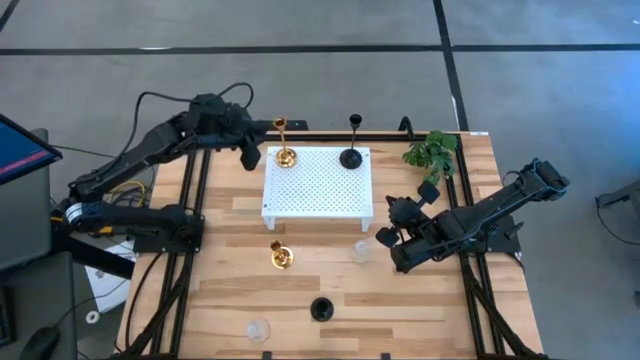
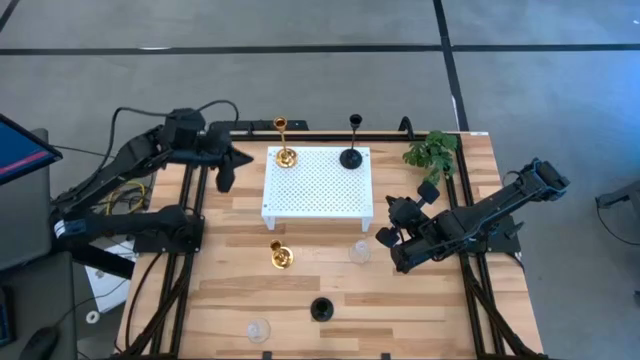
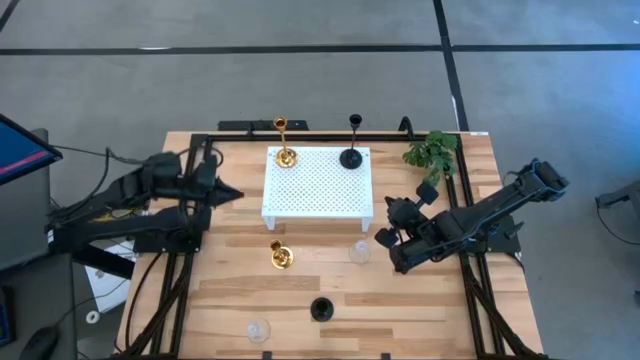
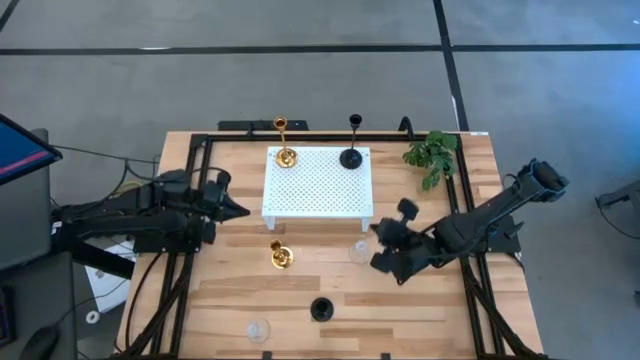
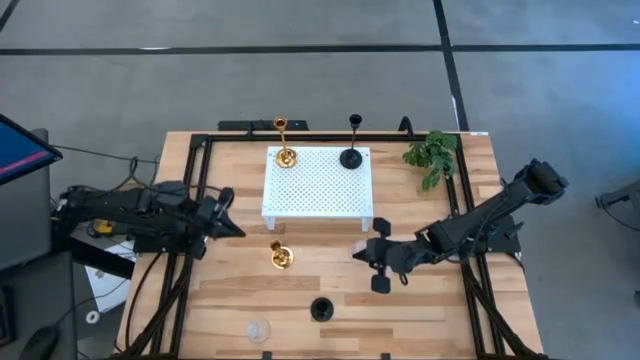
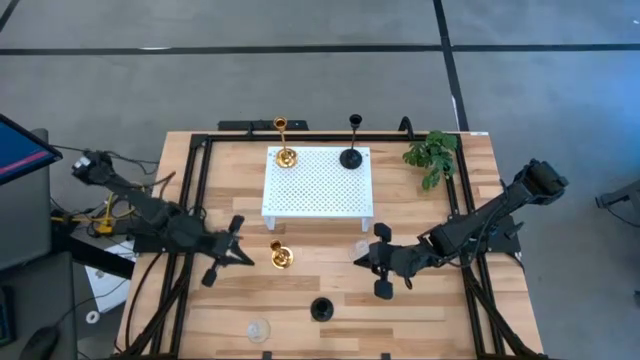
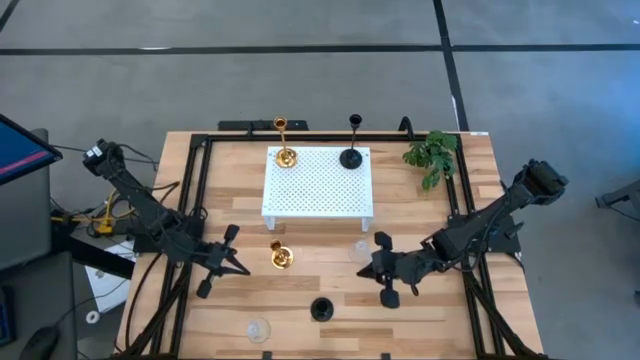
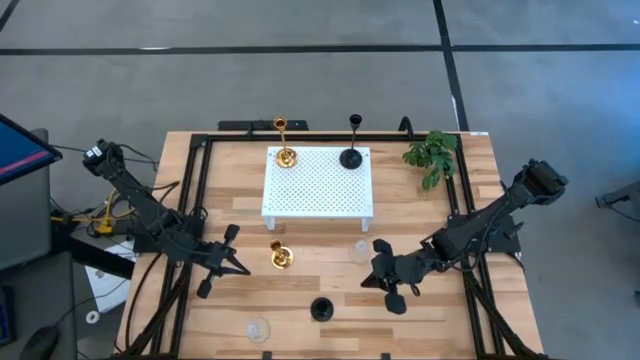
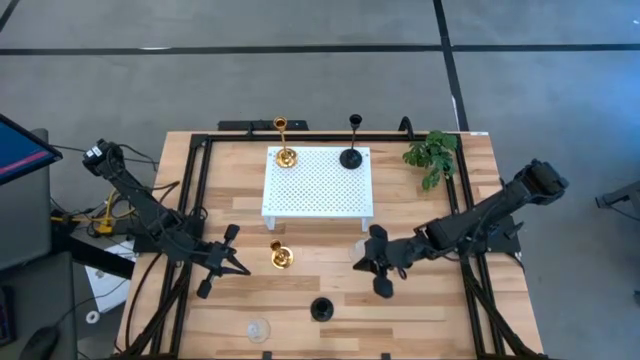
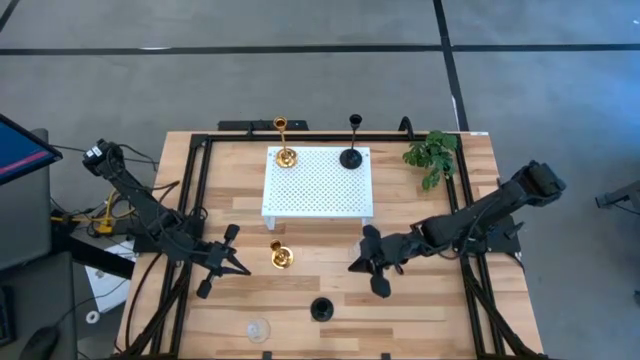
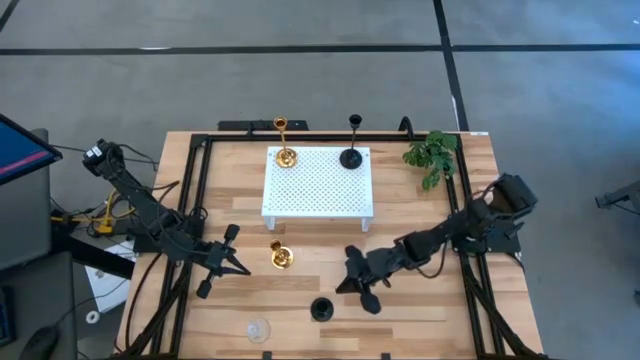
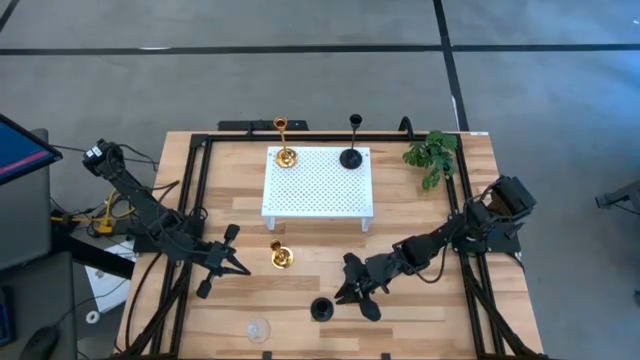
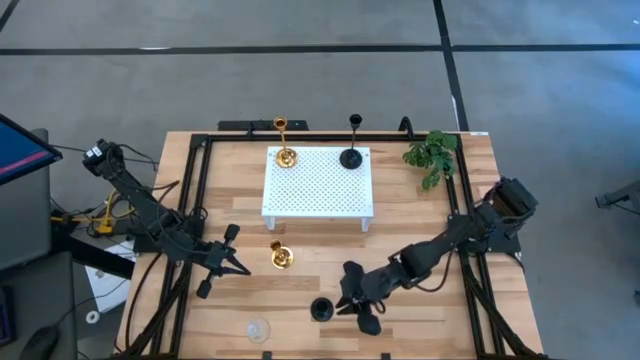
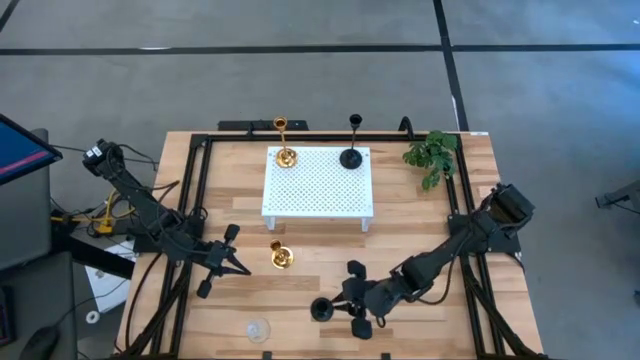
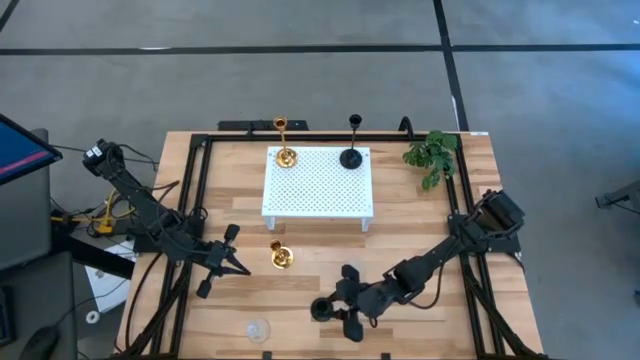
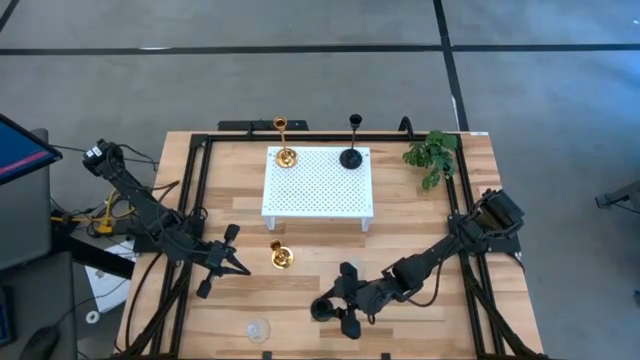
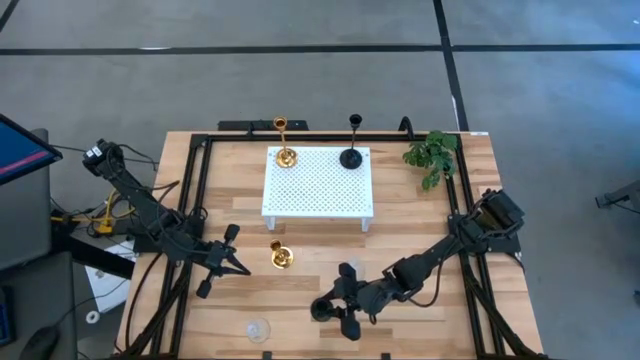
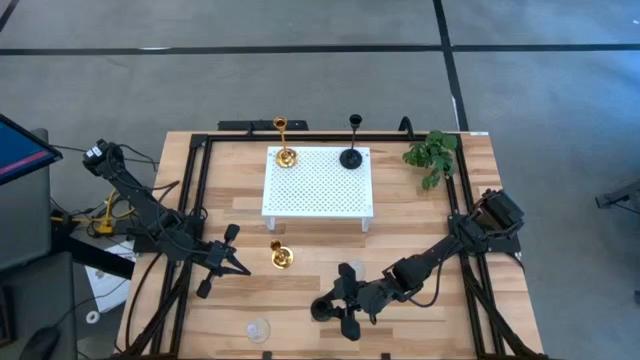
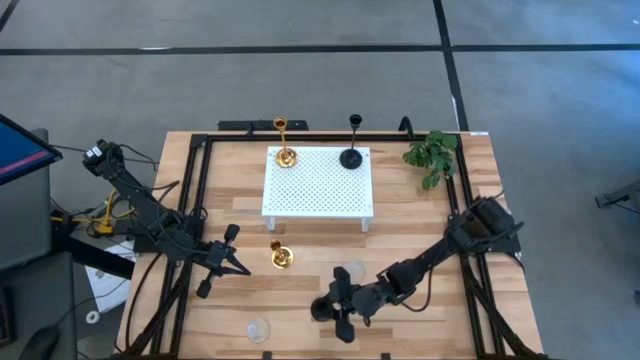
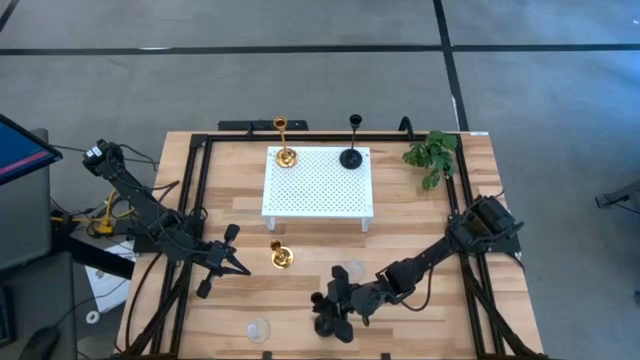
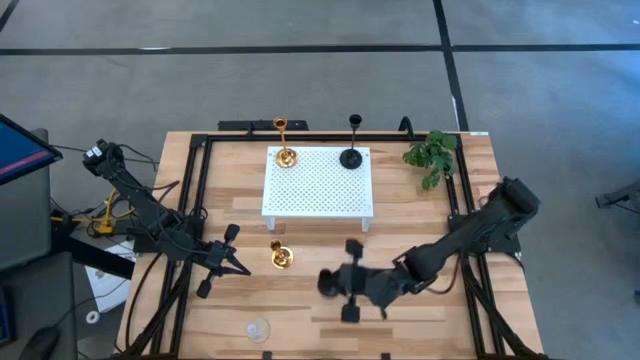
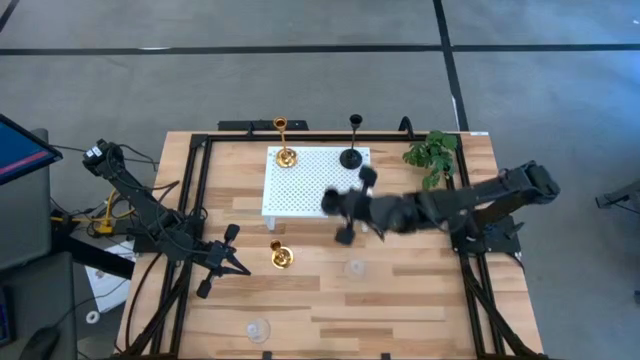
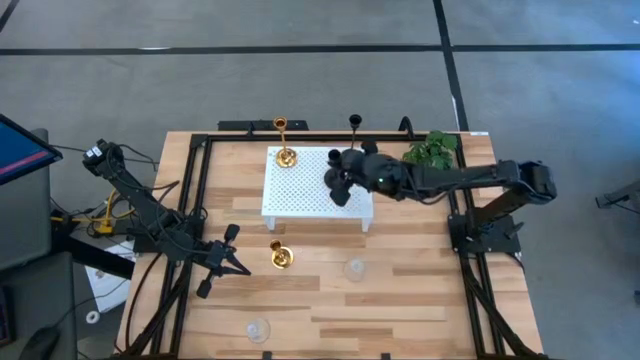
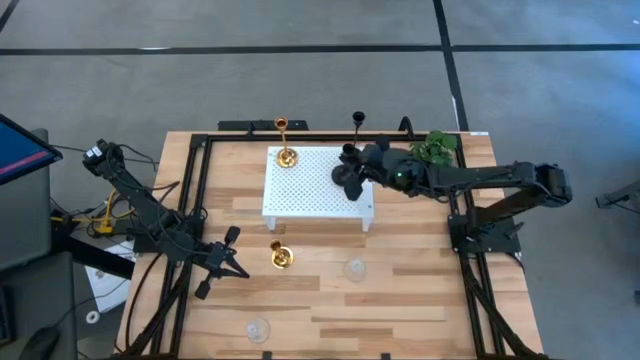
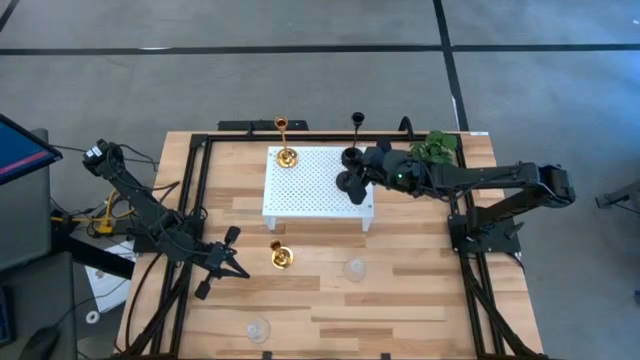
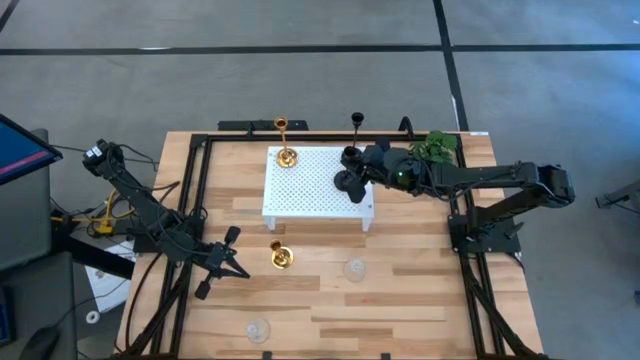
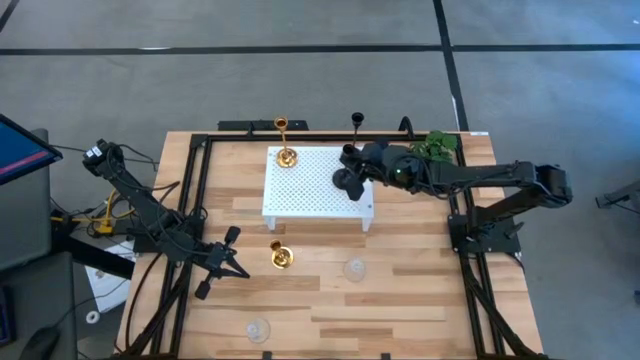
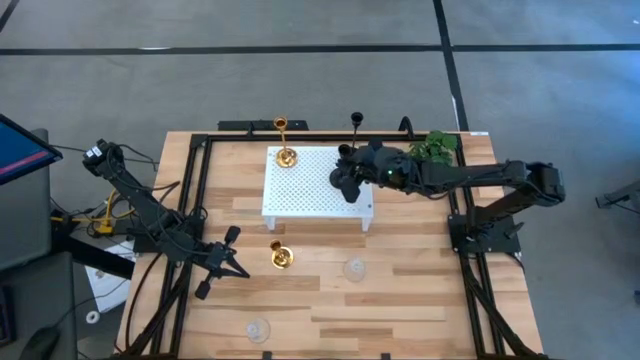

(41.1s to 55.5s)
Task: Pick & Place candle stick holders
Put the black candle holder on the shelf aligned with the other black candle holder

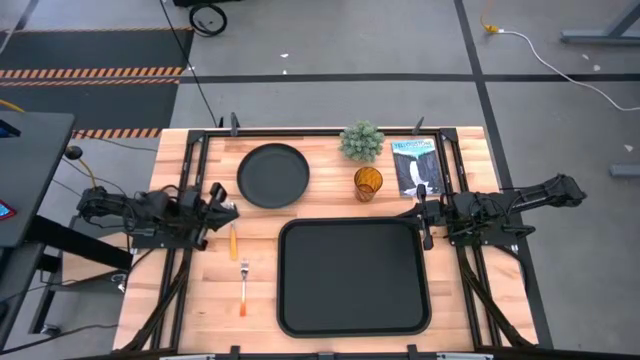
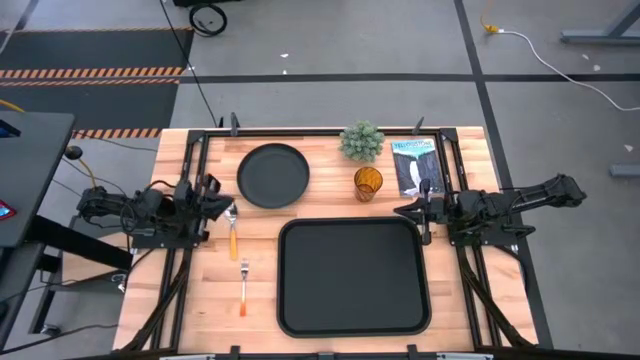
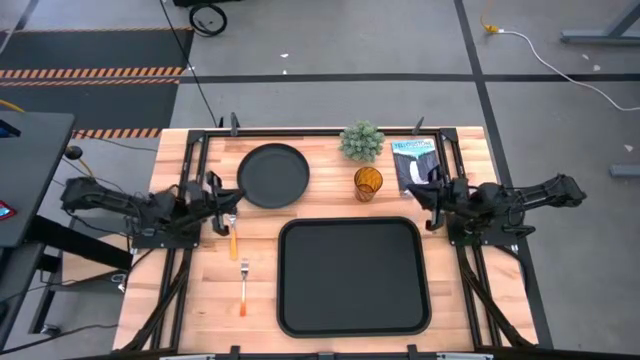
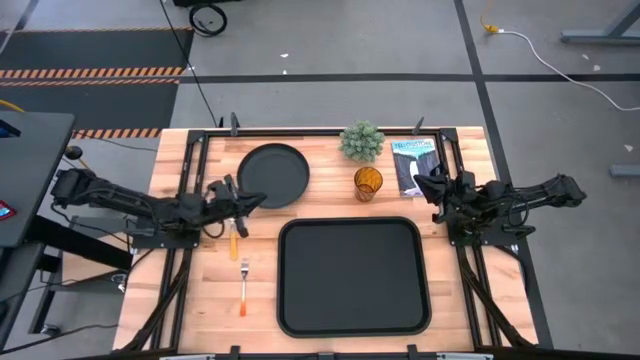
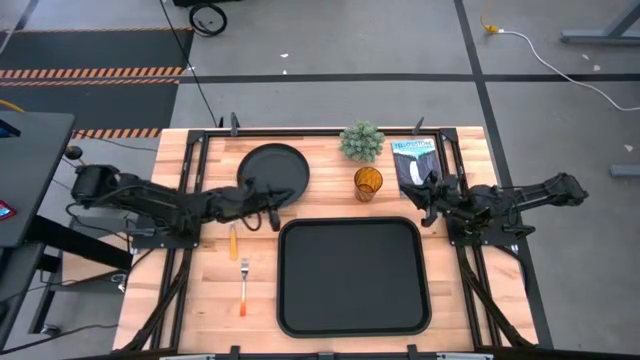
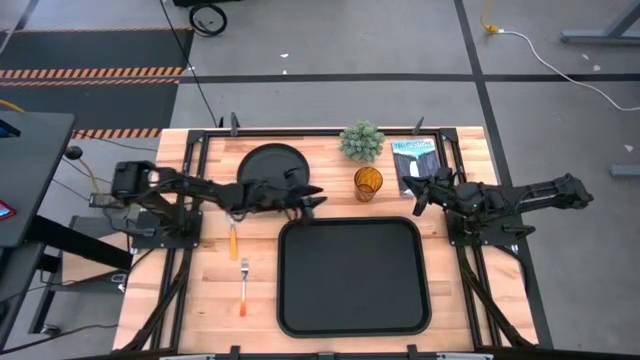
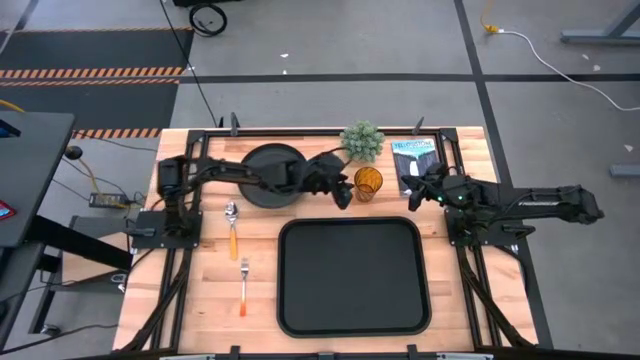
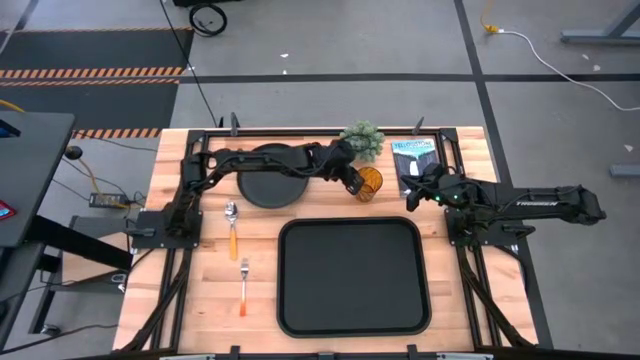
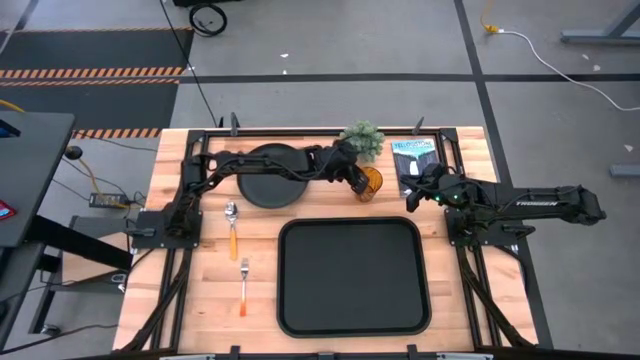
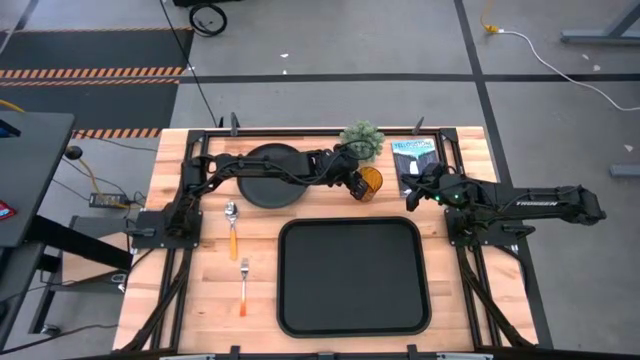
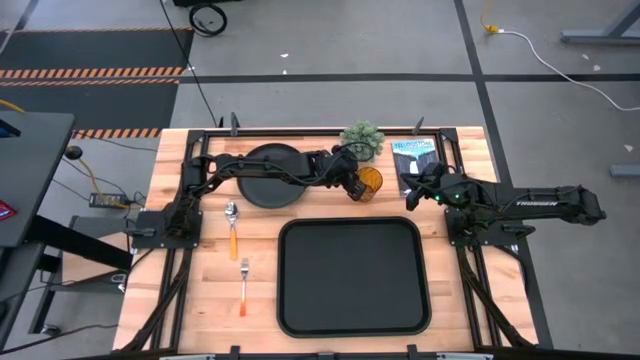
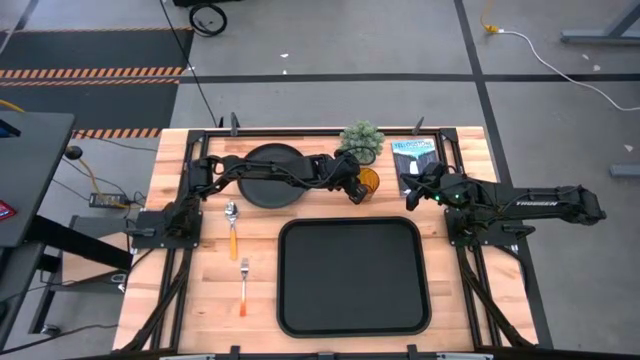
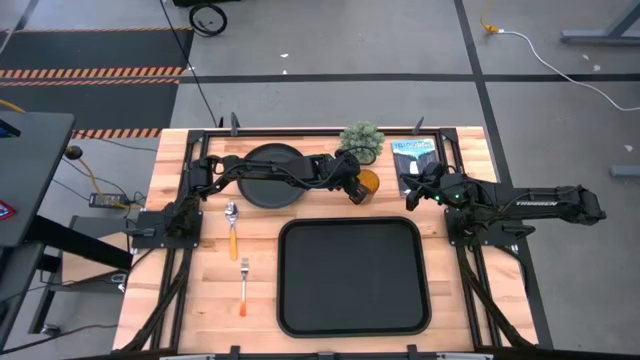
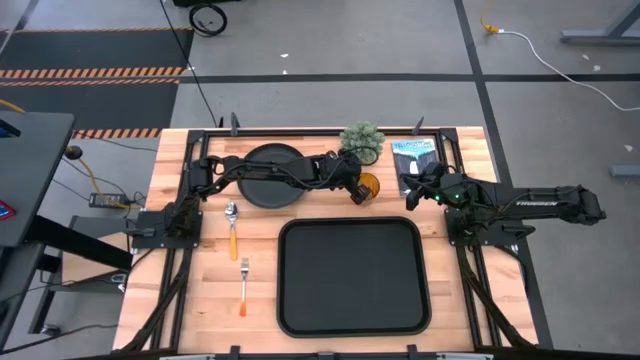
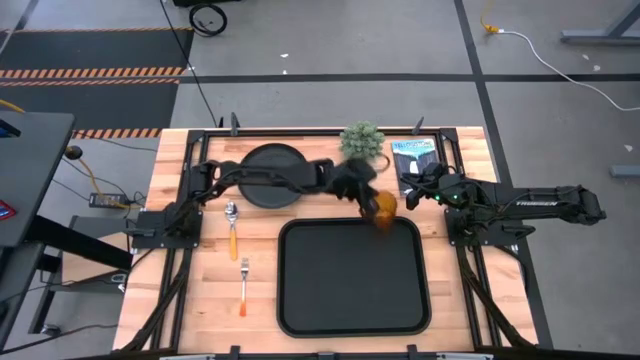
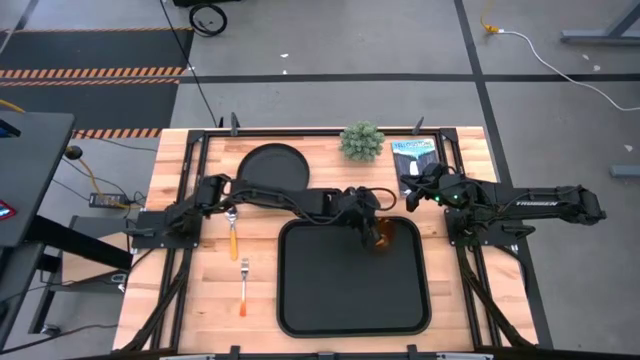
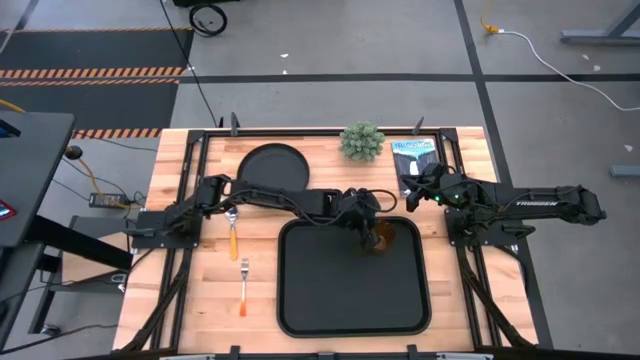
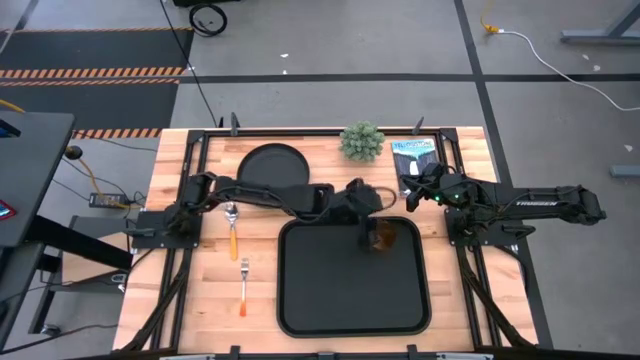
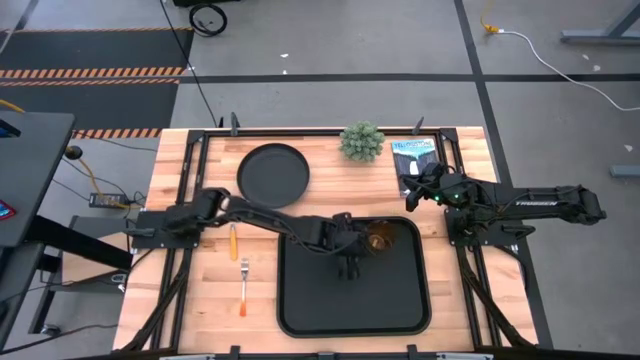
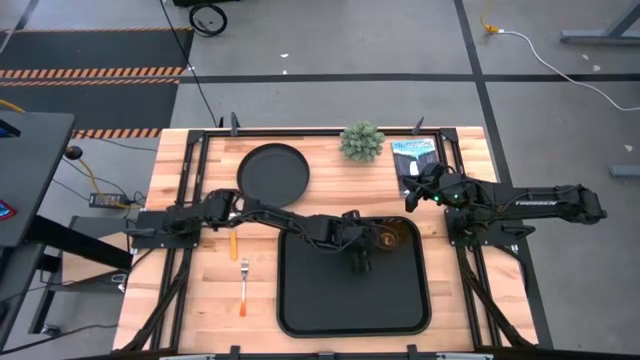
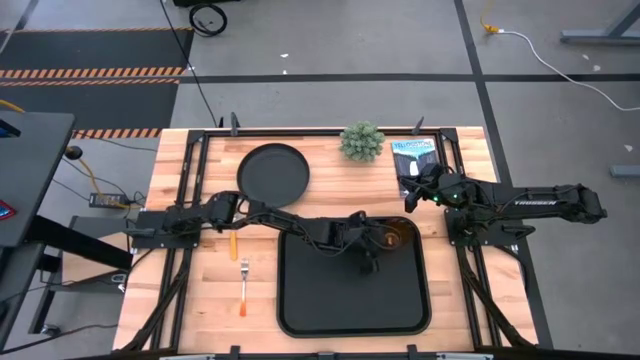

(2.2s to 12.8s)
Task: Pick and place plate/cup/fork/spoon on tray
Put the orange cup on the top right of the black serving tray
